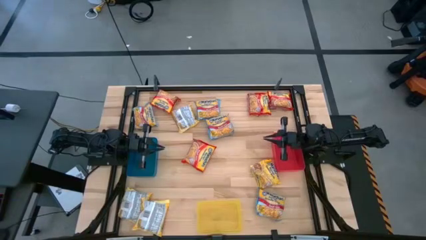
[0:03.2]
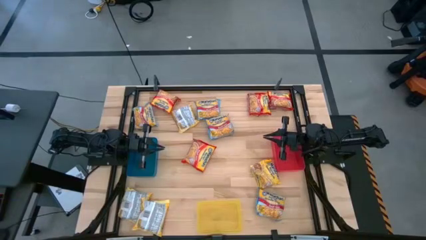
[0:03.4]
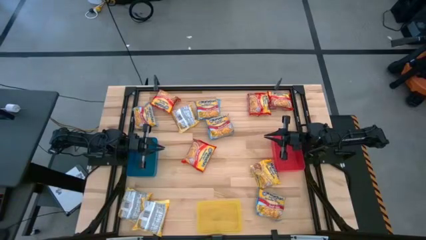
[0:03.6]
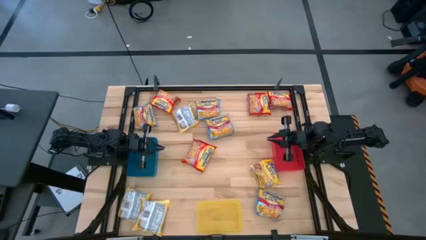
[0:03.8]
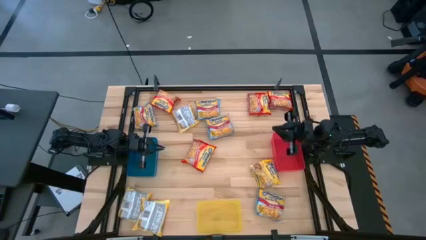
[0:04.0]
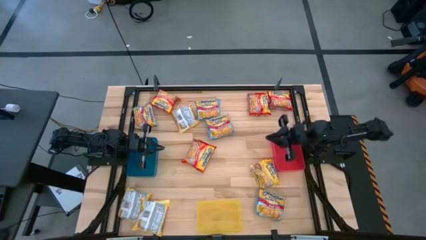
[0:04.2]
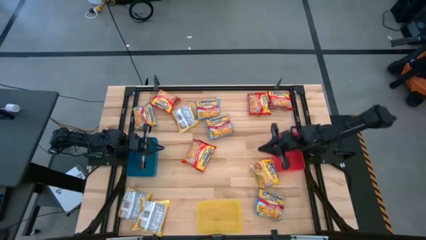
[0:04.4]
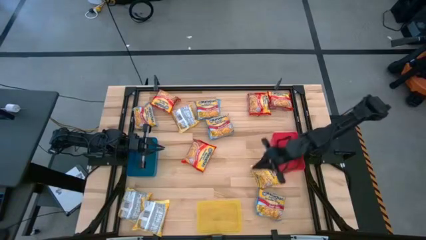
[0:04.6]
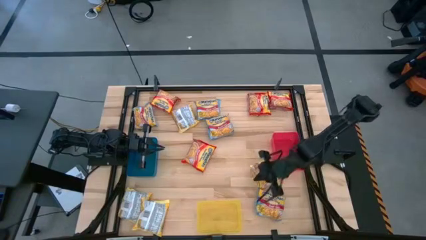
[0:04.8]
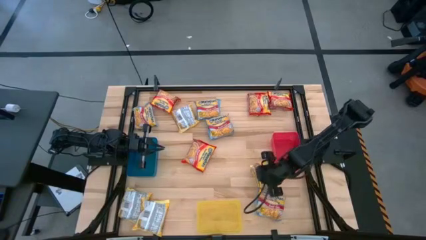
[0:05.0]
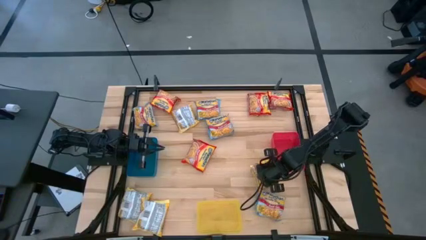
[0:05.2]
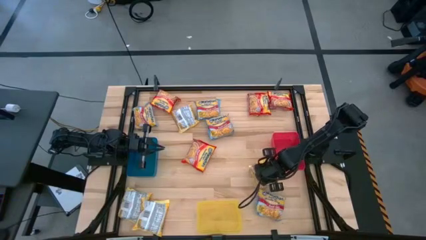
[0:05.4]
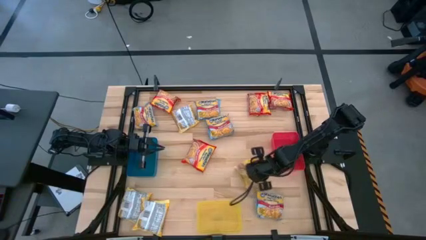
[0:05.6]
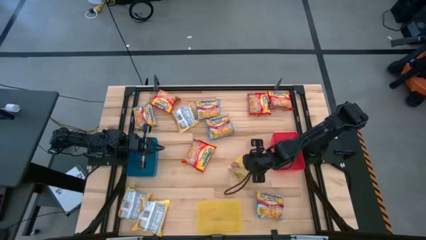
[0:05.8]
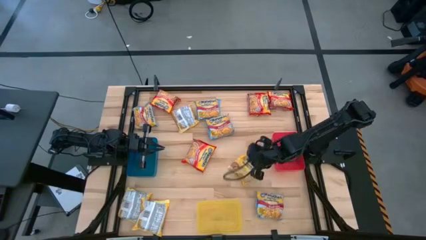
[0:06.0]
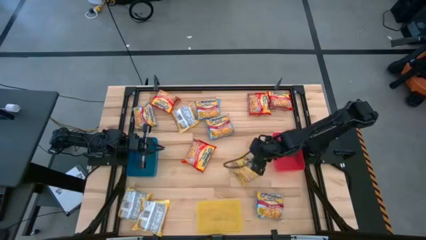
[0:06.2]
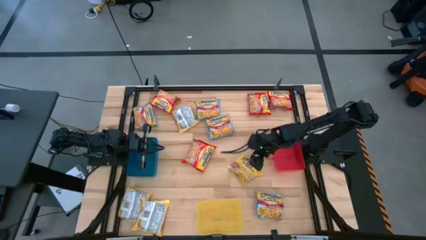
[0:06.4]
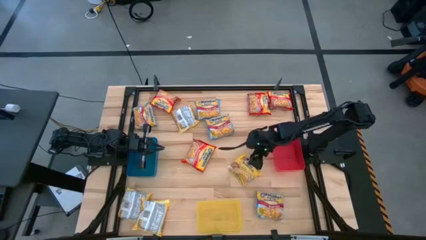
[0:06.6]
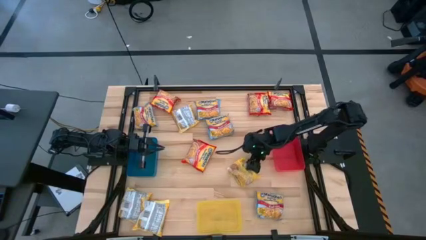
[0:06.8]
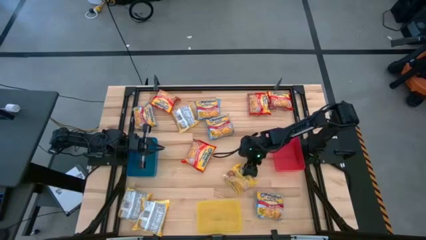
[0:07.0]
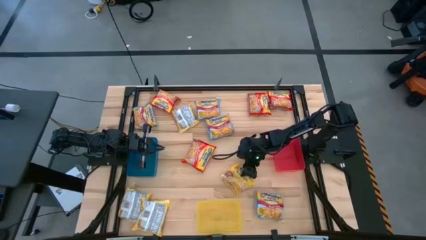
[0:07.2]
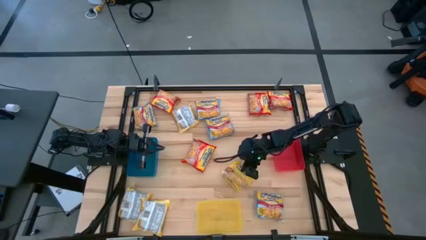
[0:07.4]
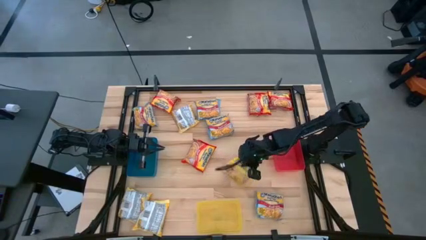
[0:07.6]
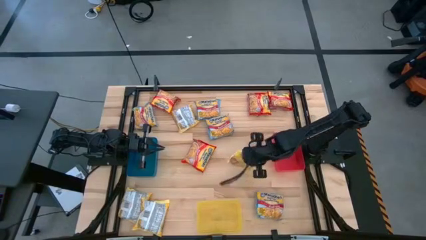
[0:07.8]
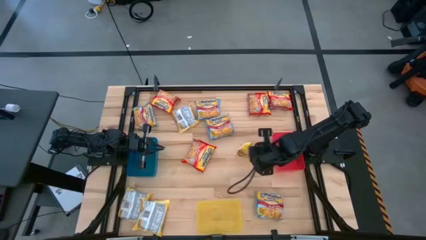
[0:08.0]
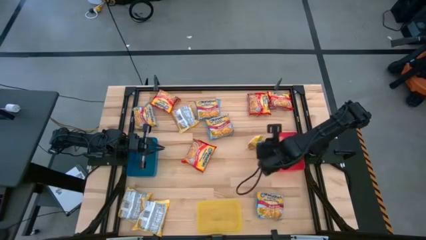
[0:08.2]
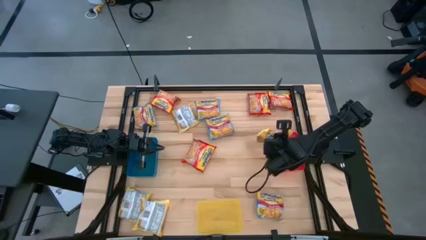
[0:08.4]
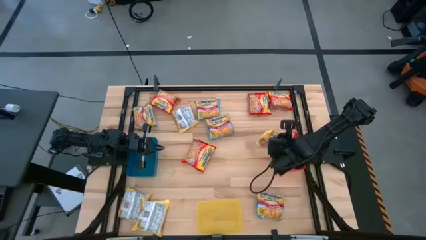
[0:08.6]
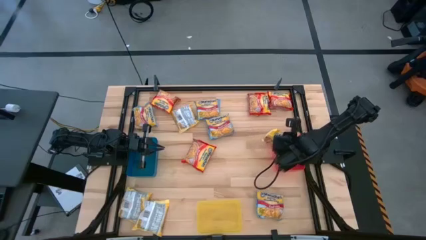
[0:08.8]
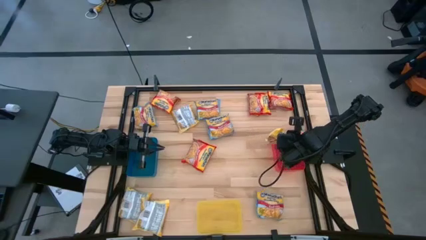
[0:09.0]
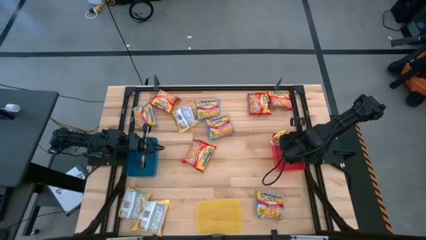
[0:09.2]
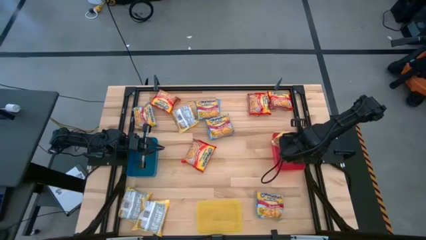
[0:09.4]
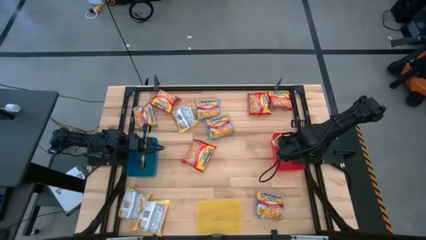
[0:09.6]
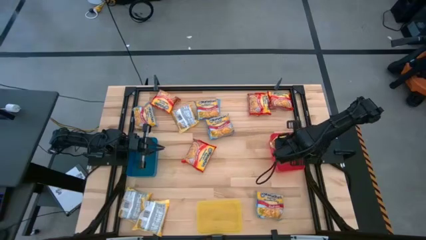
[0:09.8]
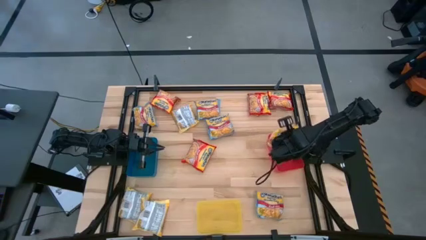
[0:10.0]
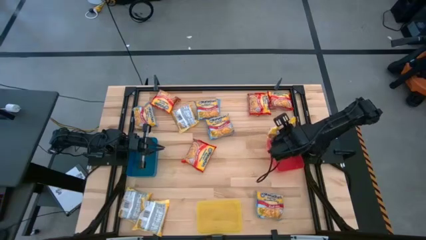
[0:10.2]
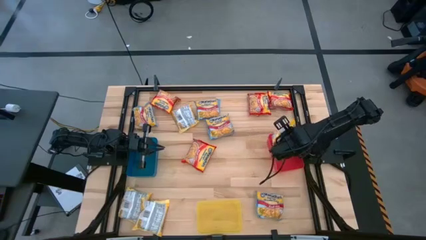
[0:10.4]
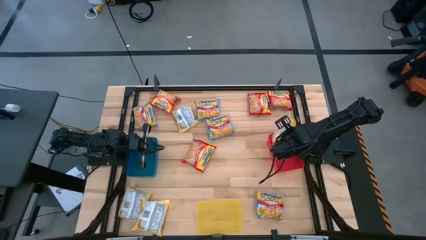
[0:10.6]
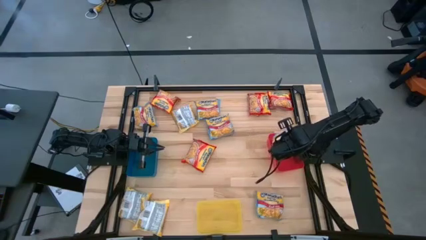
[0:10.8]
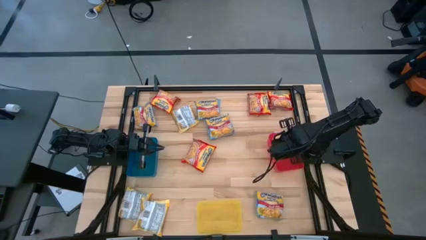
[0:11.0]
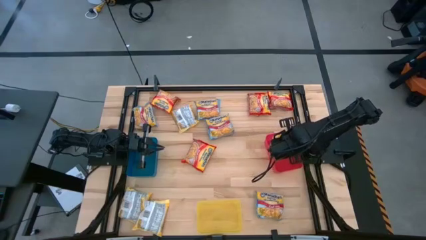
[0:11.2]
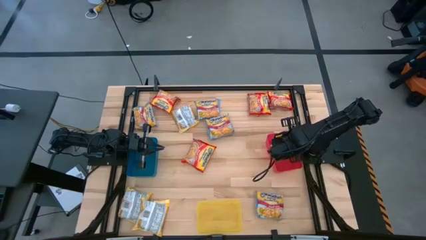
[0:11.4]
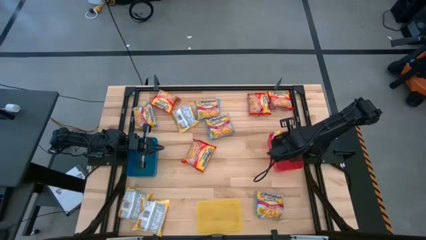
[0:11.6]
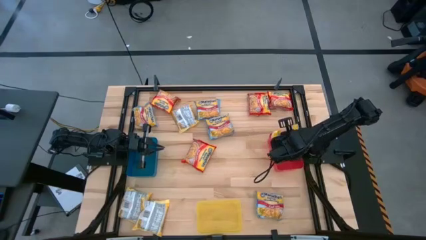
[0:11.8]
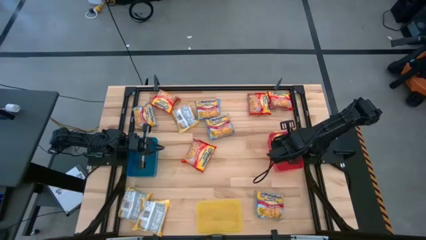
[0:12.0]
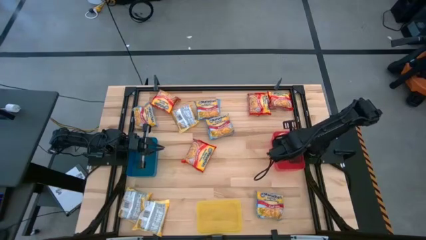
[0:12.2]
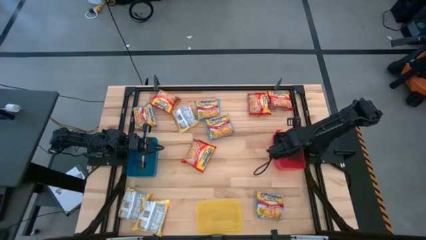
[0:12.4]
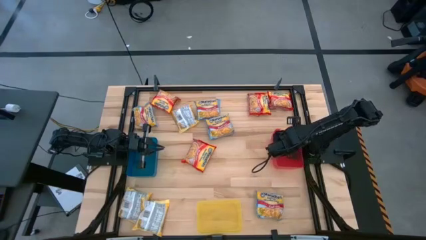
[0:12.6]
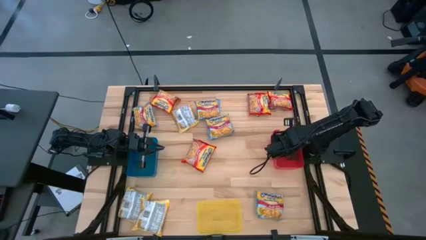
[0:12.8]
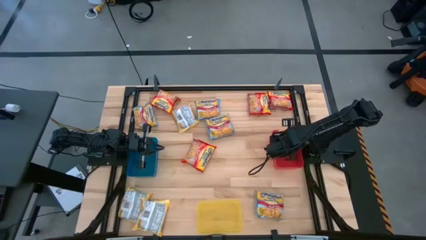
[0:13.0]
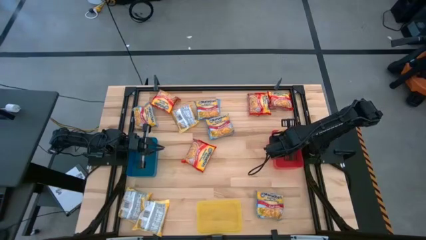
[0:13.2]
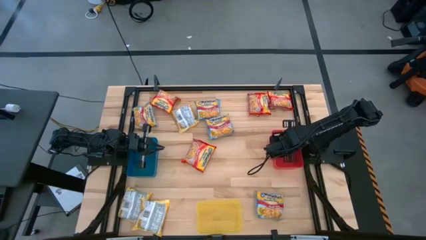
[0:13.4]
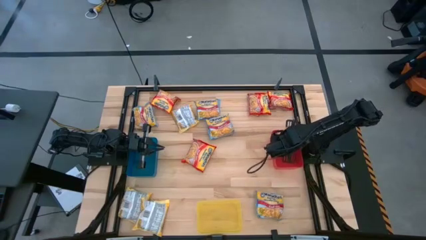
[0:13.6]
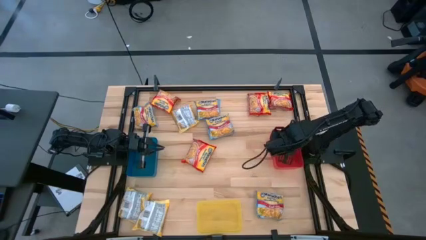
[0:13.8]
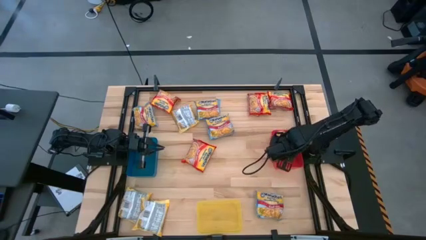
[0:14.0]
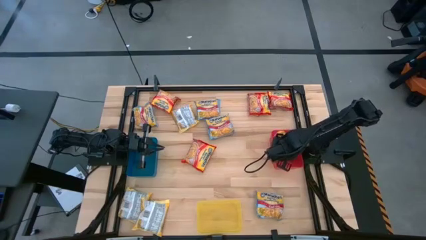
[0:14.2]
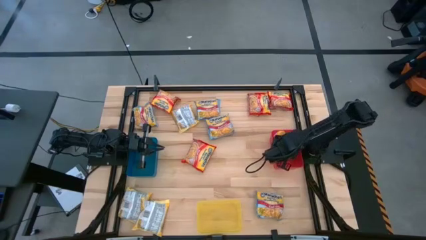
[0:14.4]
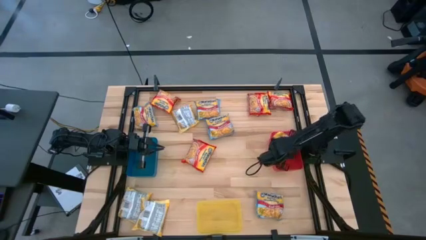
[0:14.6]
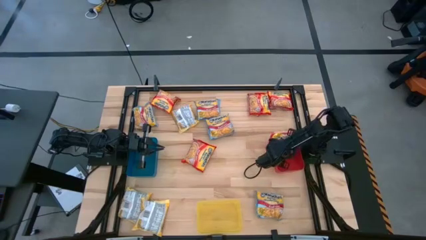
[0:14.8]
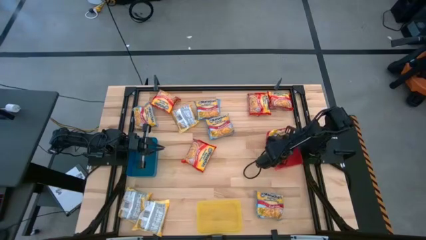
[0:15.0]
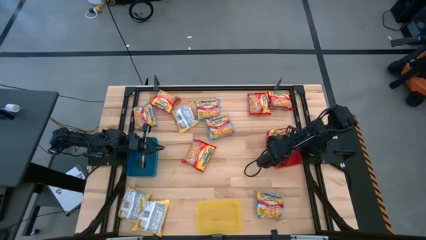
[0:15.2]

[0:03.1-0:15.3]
Task: Sort Maruchan noodles
Put the yellow noodle pack into the red bin

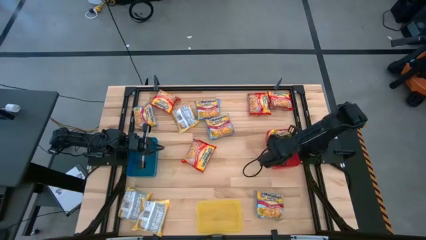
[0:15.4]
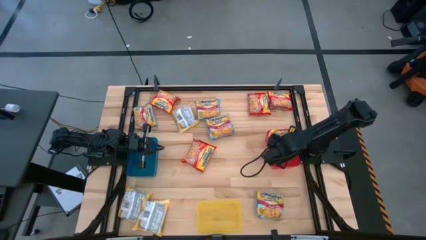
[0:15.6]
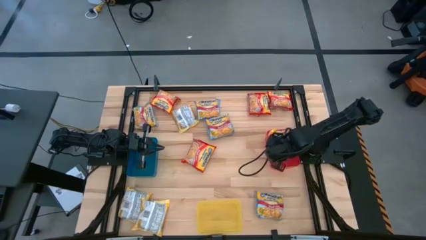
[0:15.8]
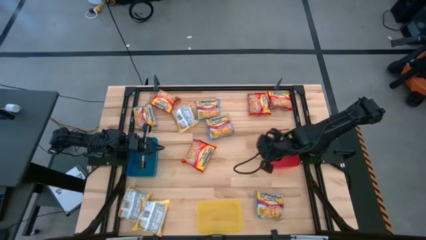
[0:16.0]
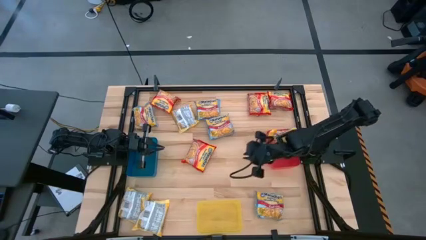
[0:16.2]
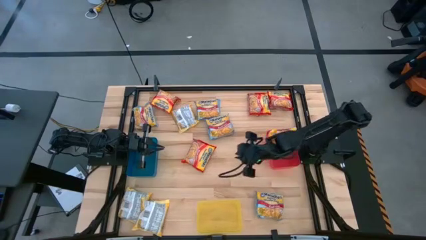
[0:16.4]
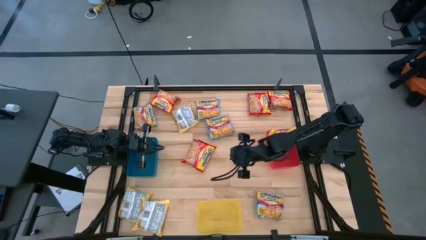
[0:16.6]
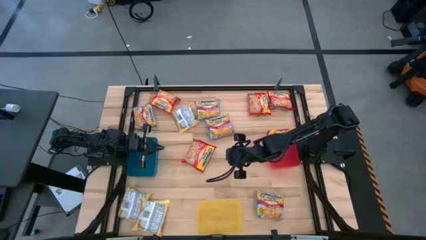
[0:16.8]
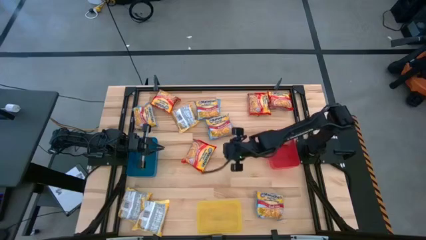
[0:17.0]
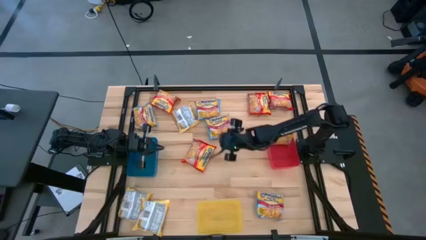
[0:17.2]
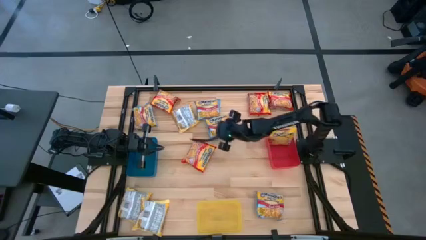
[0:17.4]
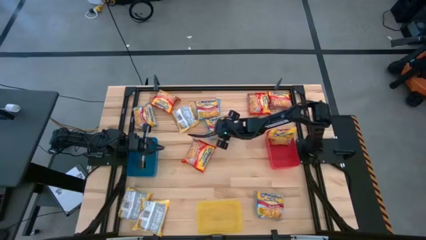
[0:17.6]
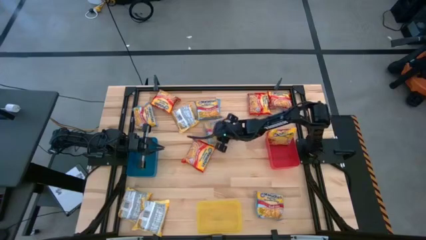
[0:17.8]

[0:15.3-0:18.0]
Adjust the blue noodle pack on the table
